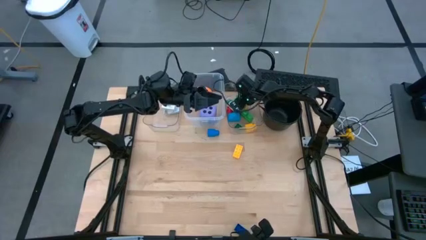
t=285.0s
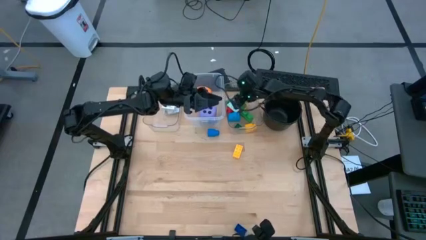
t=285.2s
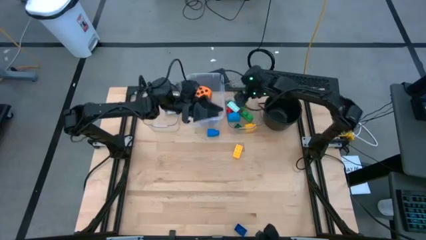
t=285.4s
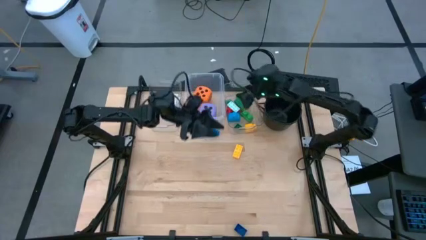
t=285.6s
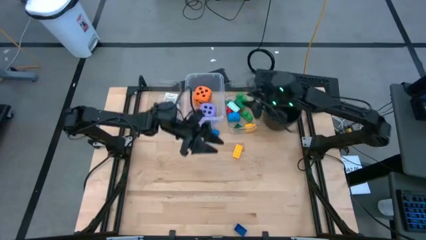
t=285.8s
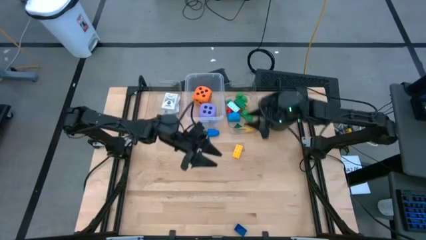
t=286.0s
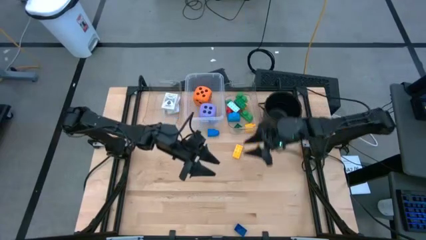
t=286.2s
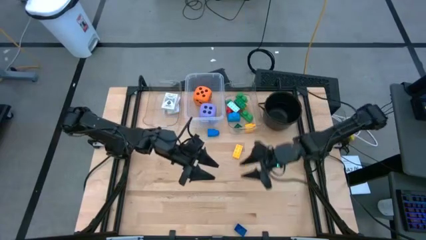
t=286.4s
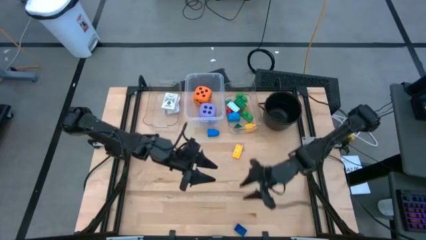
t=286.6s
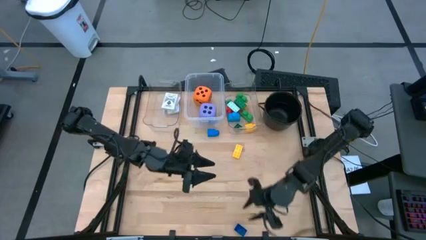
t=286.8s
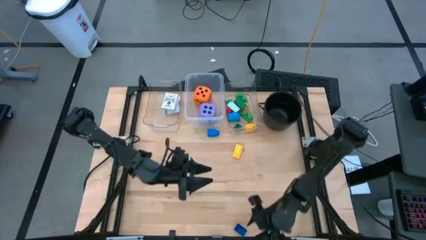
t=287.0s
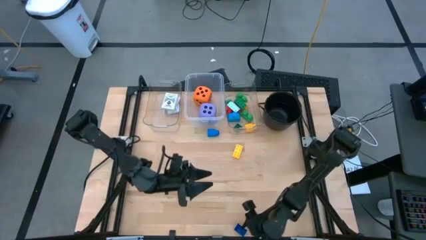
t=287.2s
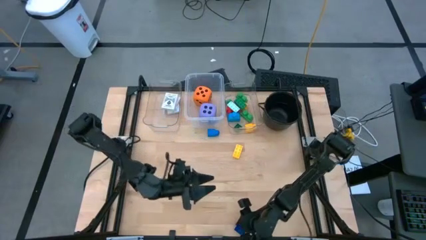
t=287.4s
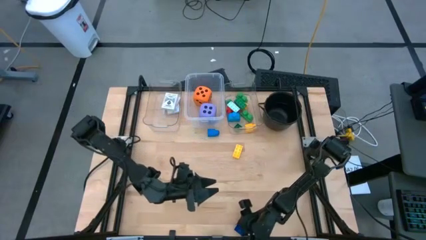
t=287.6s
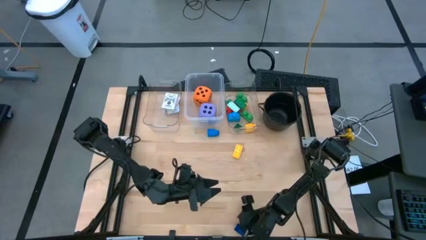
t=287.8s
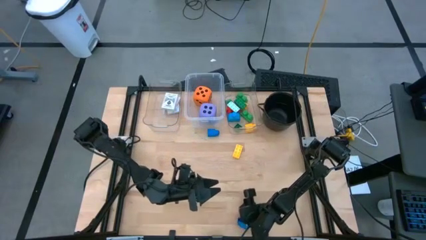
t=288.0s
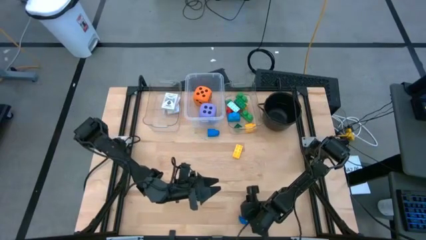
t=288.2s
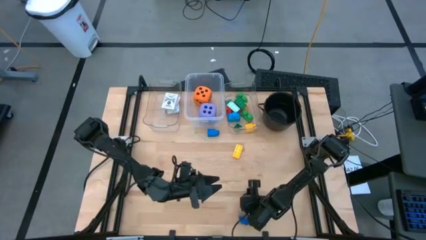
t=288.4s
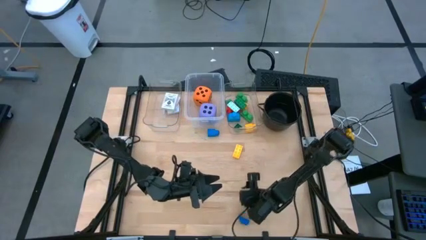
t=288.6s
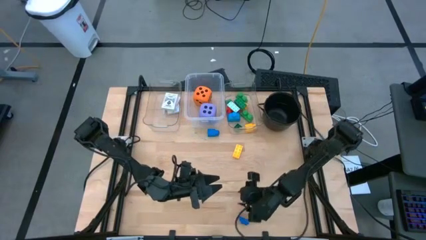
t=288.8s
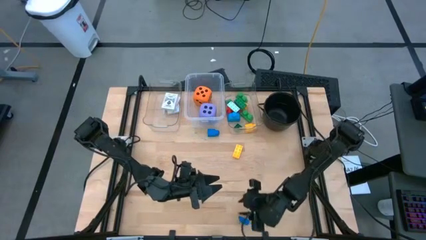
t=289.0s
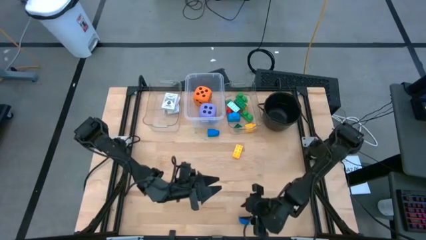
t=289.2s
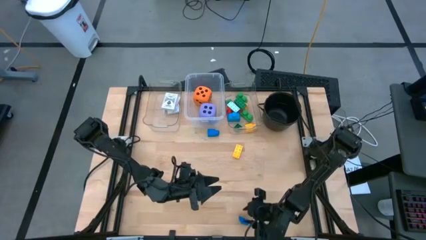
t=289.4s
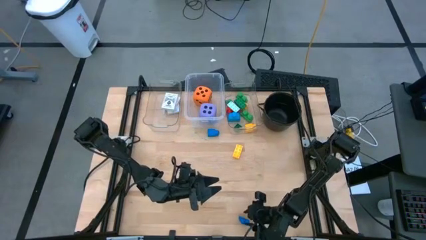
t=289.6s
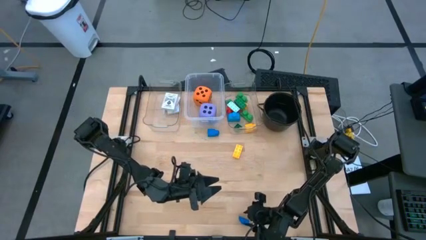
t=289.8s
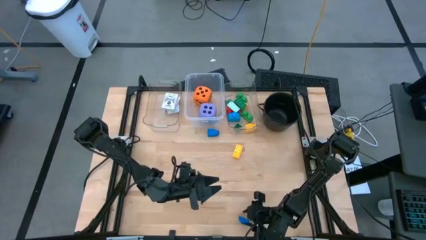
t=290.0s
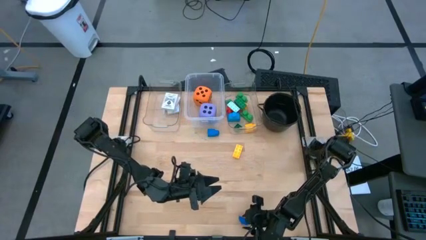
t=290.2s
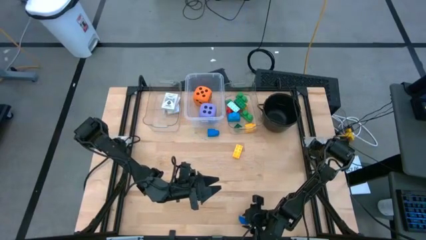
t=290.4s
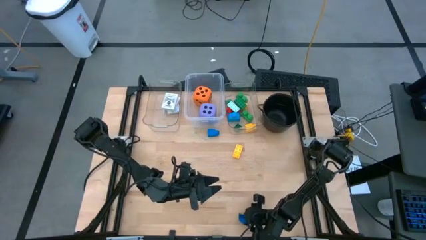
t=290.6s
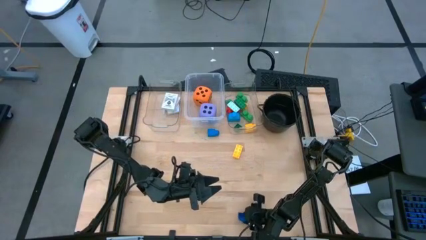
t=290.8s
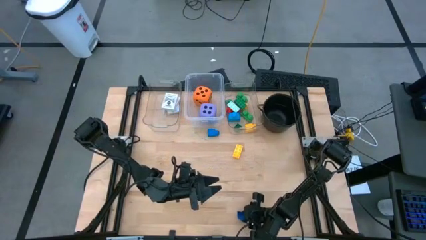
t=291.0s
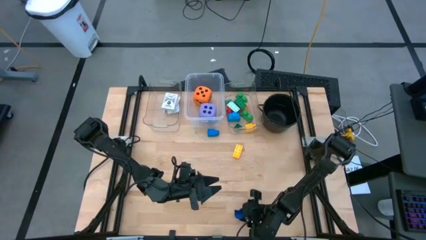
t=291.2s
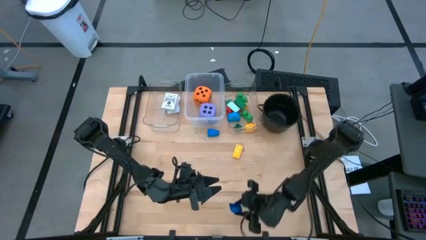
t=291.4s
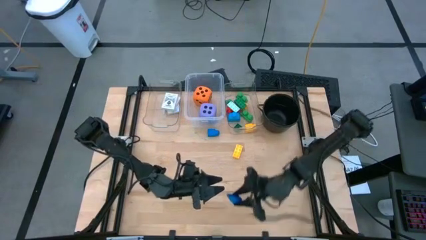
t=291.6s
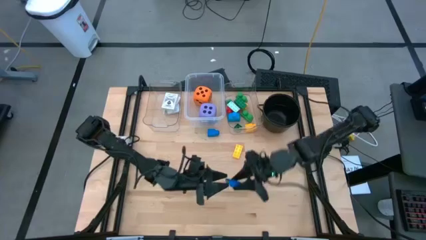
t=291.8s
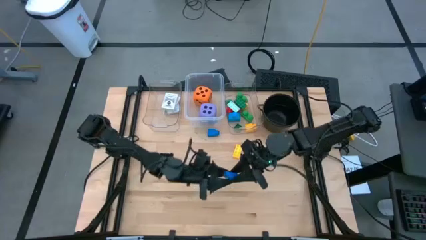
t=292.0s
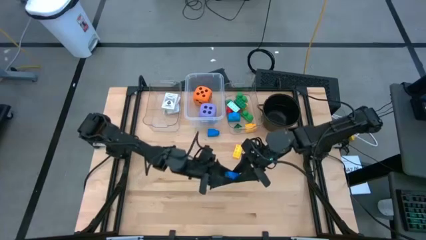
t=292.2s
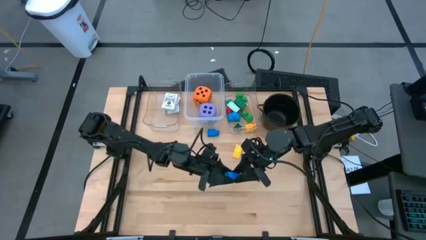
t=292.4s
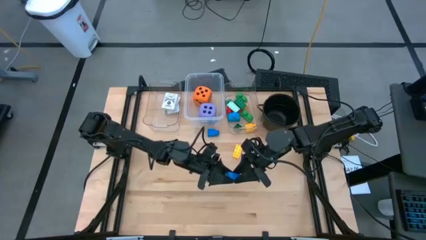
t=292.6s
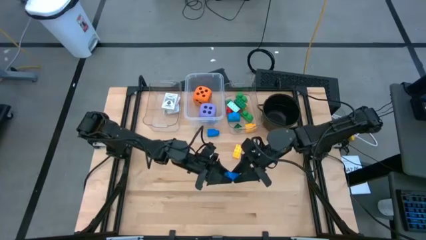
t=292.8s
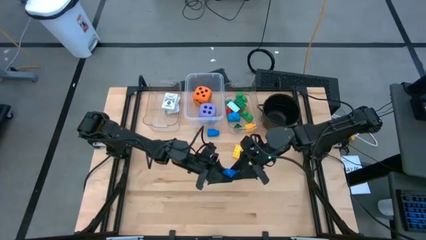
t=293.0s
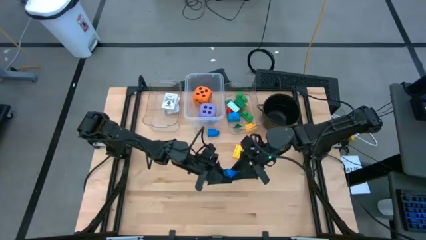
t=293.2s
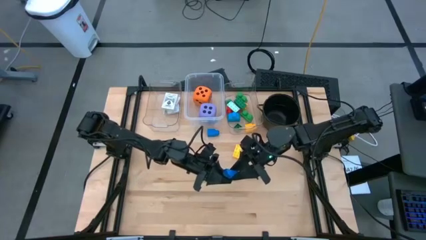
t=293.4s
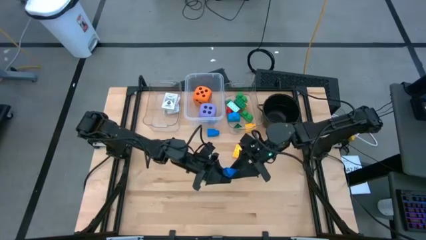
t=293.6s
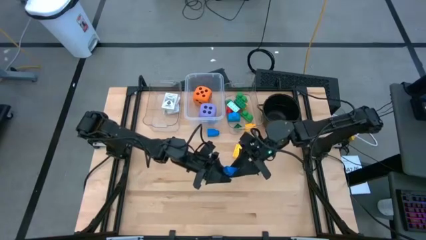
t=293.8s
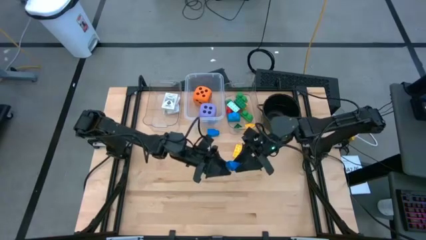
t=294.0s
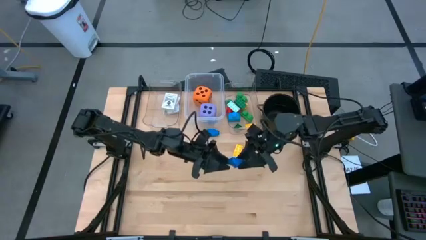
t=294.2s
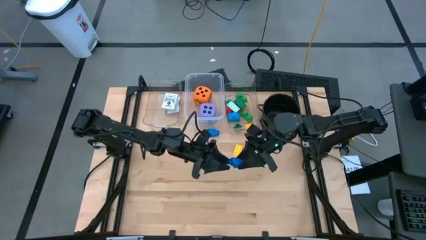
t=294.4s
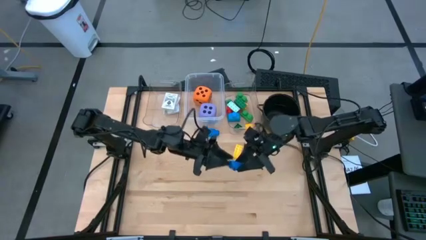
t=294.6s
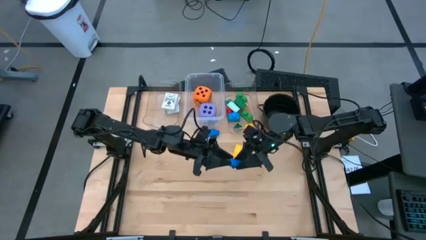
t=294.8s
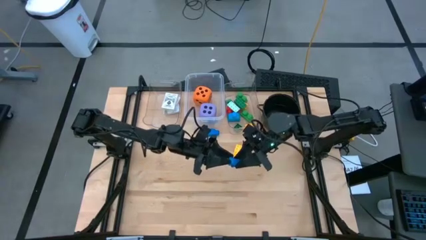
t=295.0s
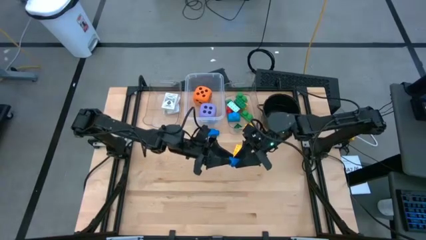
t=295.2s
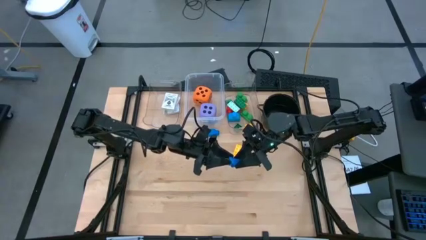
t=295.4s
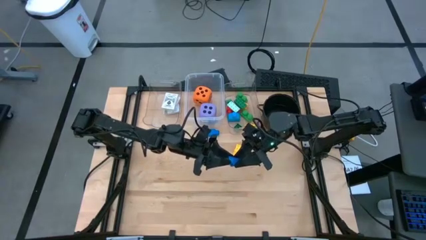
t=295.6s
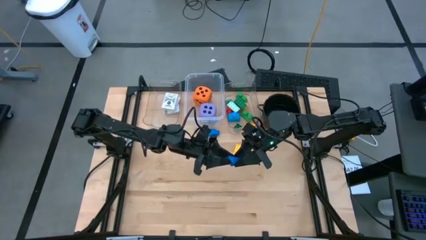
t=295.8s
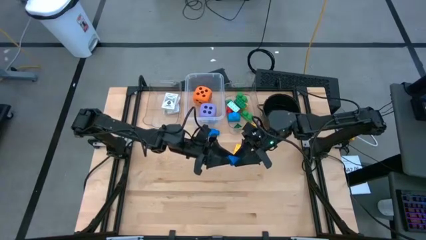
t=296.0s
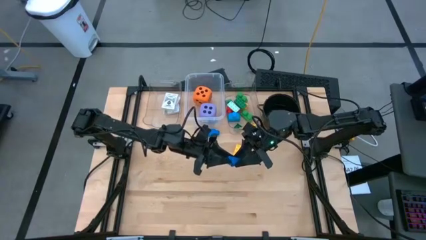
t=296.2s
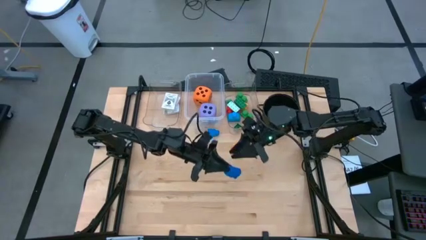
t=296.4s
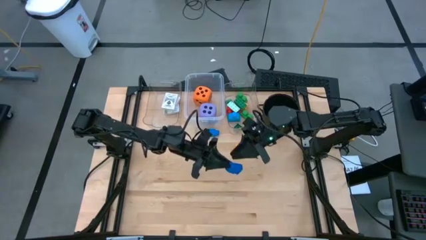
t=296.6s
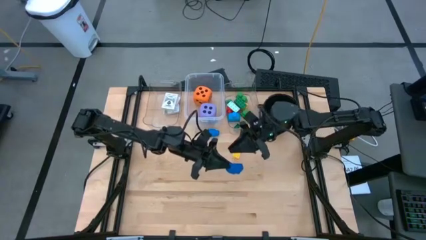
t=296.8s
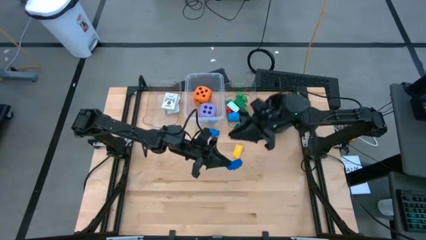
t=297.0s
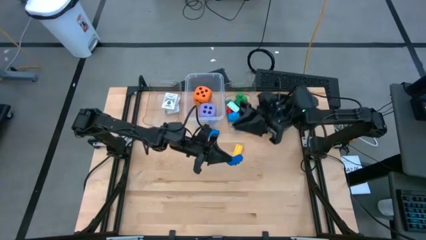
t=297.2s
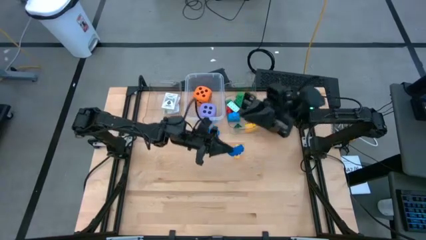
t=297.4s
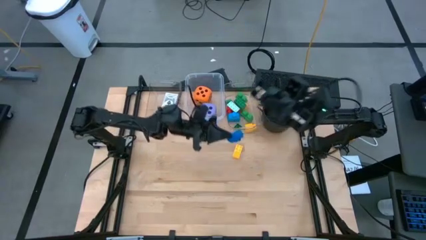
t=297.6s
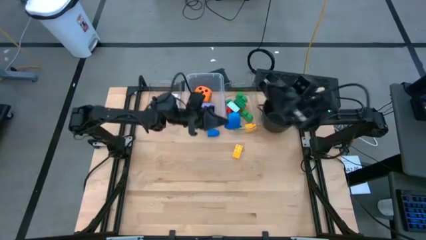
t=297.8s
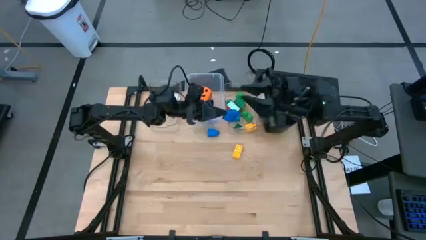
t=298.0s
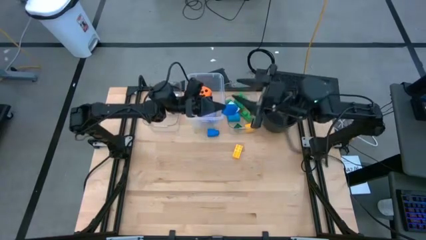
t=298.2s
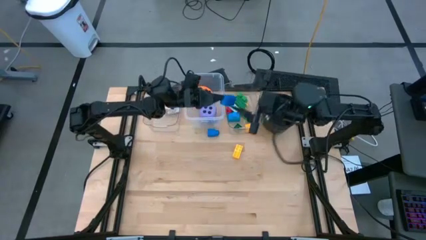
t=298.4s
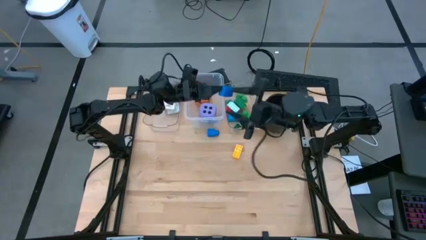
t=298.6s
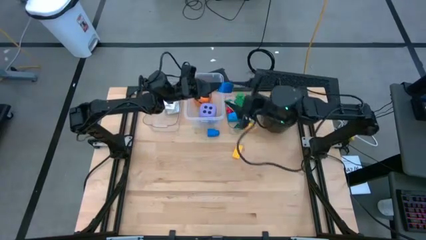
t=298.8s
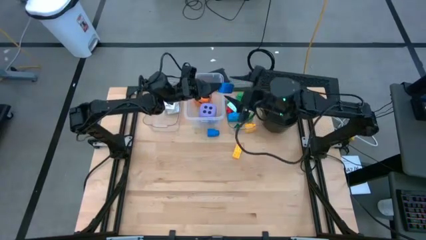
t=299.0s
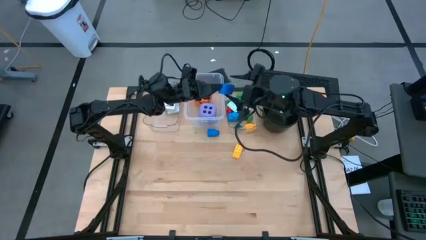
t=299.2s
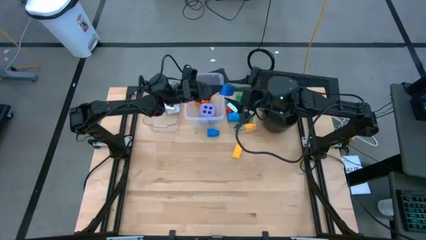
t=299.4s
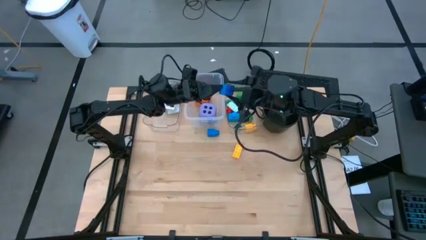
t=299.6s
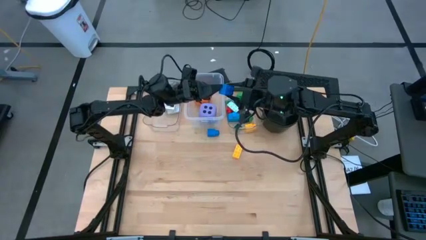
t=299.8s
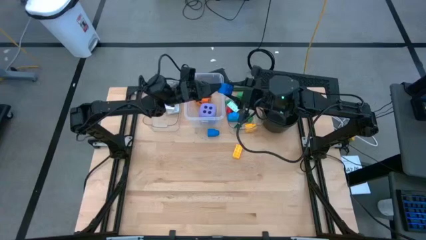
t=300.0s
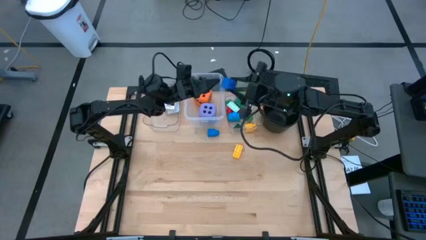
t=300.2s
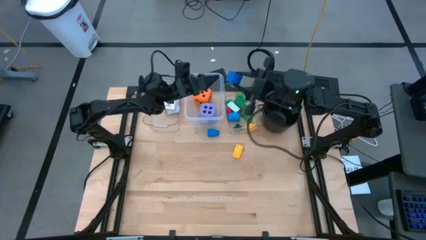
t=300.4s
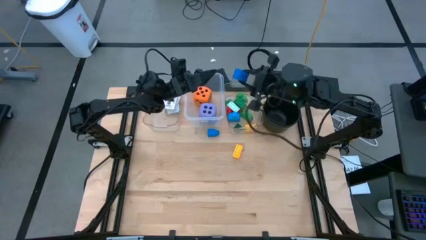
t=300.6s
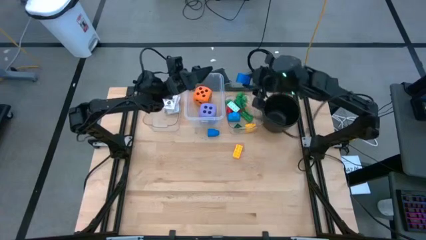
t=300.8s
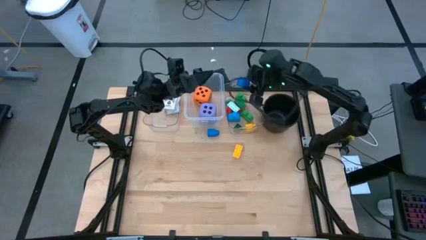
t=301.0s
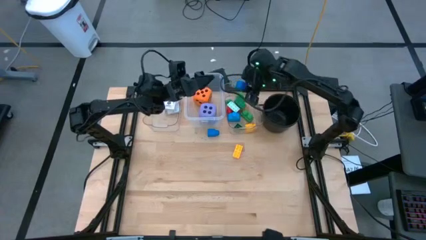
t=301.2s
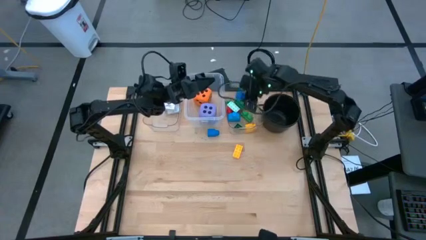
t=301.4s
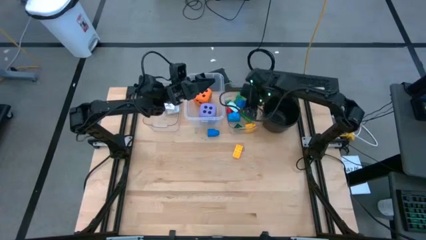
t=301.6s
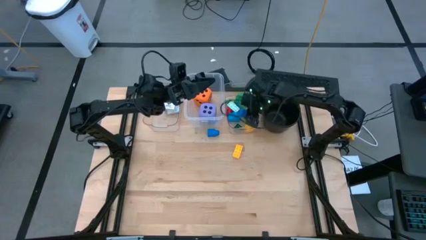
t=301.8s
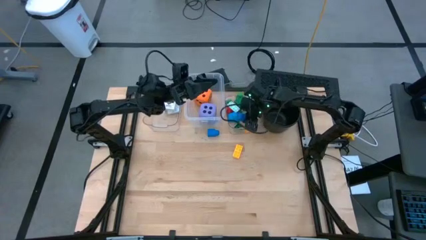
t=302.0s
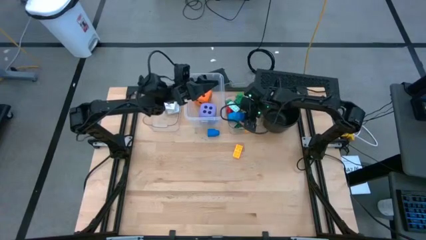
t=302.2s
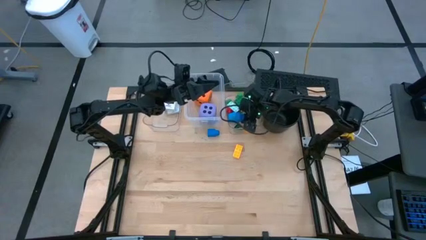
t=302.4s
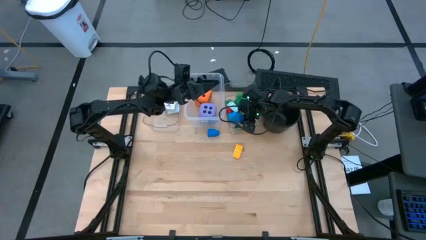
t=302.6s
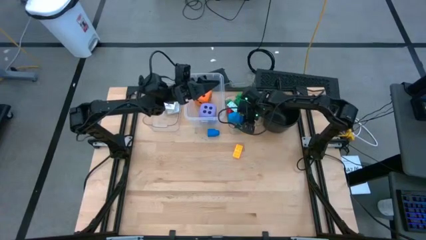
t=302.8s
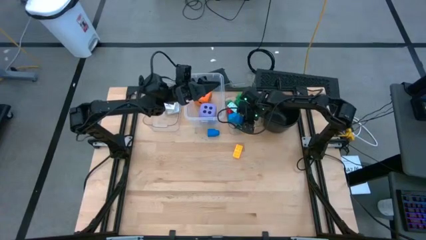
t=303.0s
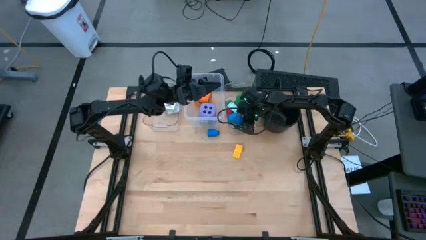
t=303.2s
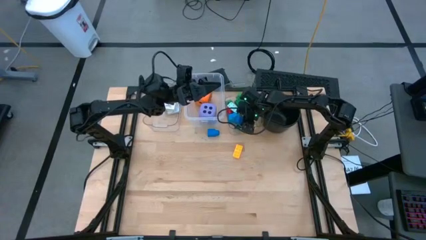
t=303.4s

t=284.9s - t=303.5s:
Task: Pick & Place Toys
Put the dark blue game piece into the right transparent bin
